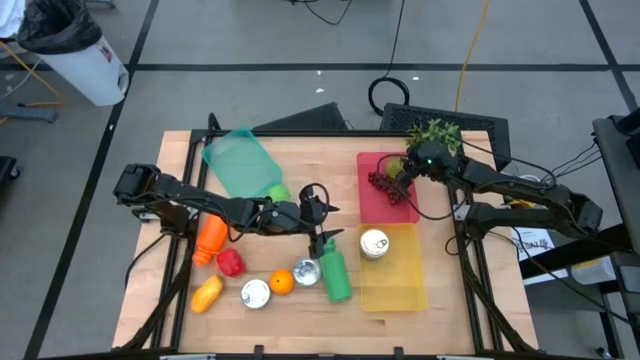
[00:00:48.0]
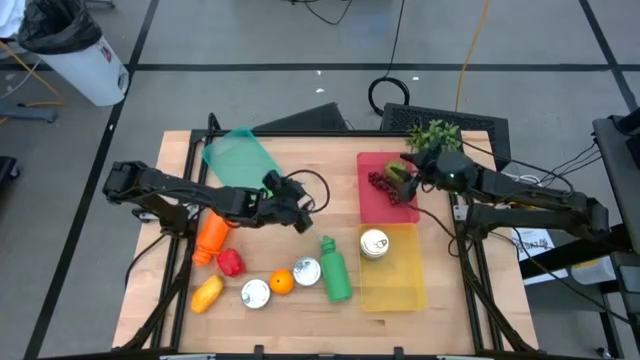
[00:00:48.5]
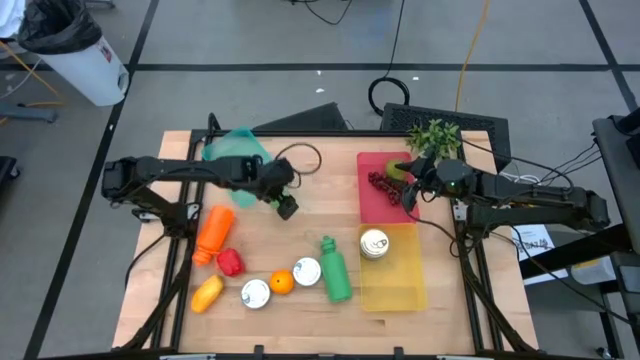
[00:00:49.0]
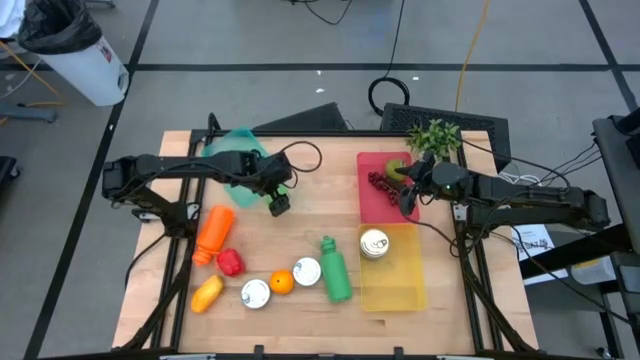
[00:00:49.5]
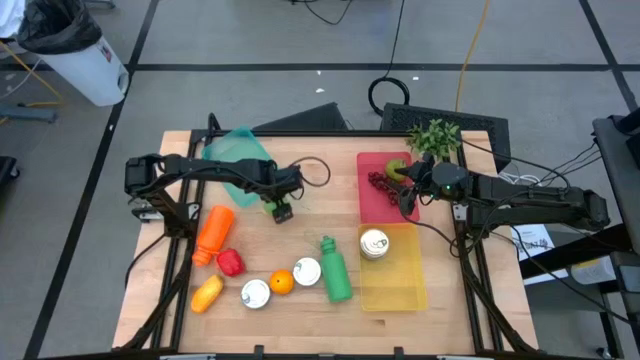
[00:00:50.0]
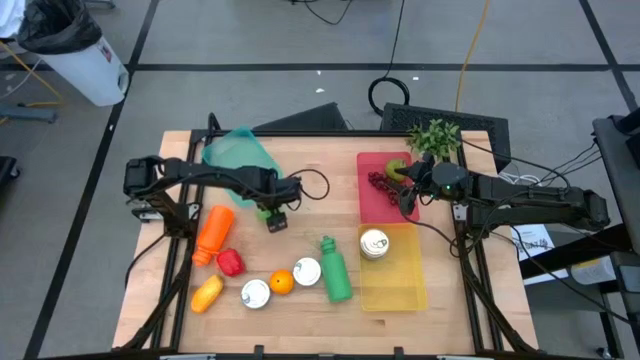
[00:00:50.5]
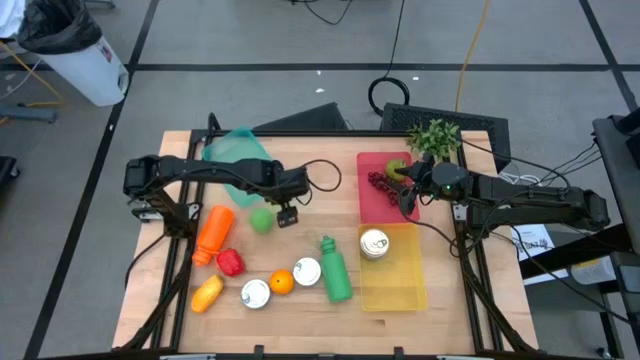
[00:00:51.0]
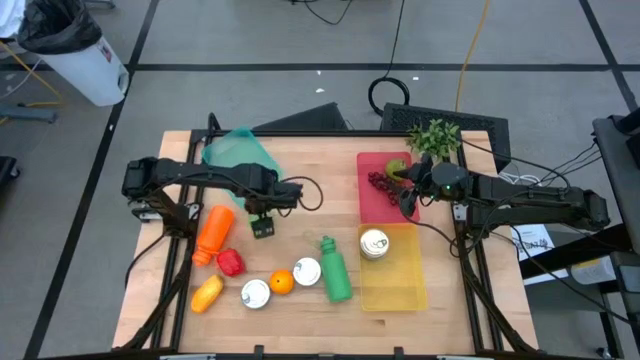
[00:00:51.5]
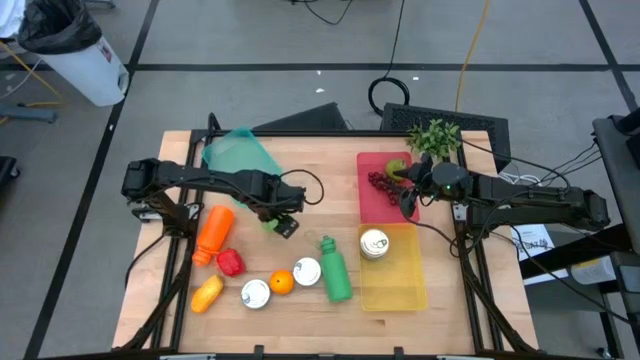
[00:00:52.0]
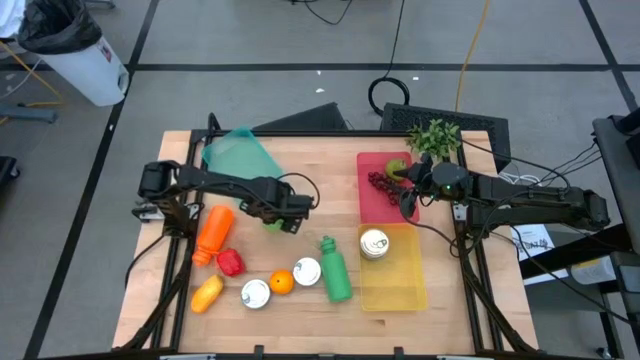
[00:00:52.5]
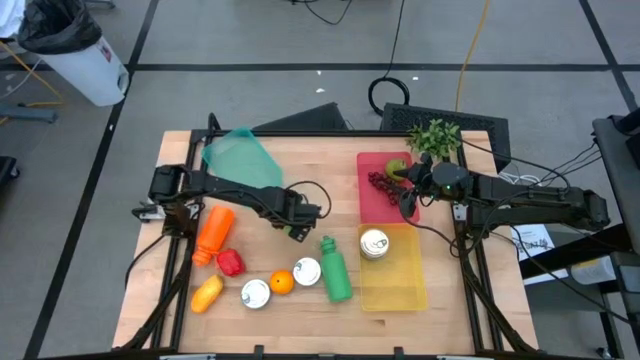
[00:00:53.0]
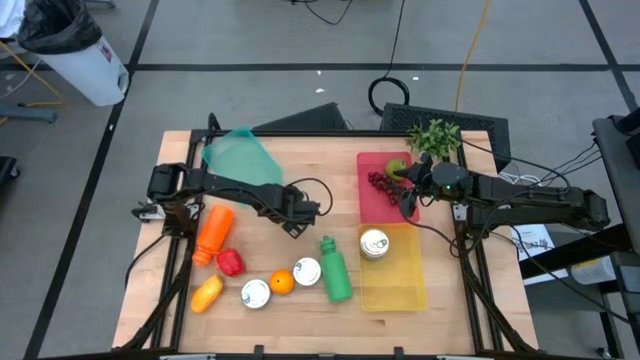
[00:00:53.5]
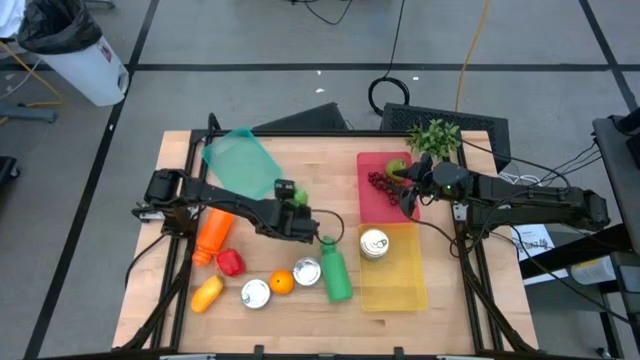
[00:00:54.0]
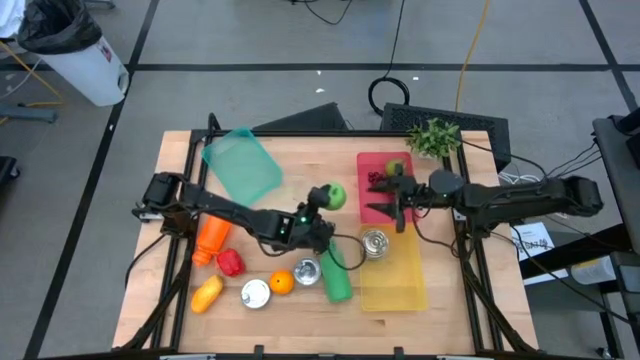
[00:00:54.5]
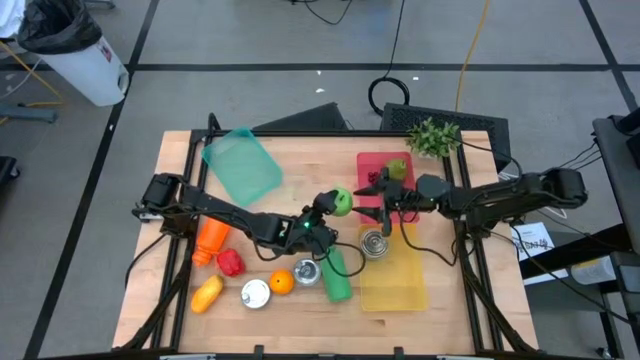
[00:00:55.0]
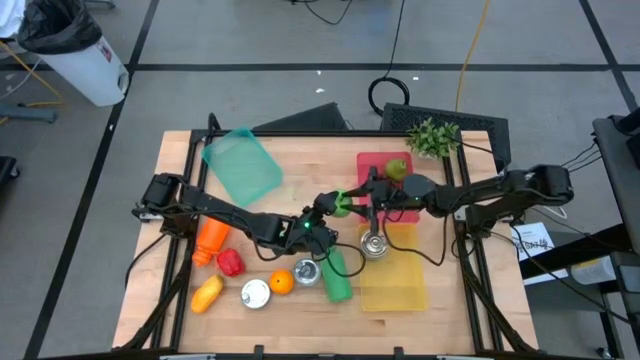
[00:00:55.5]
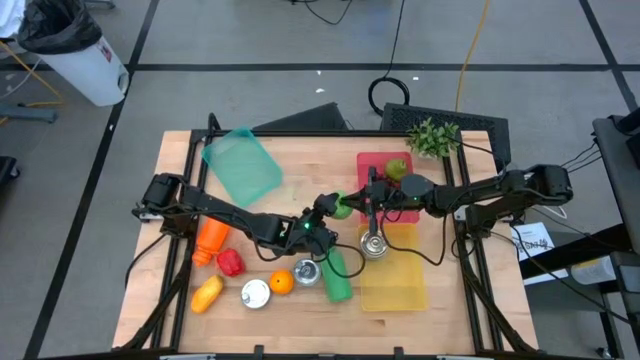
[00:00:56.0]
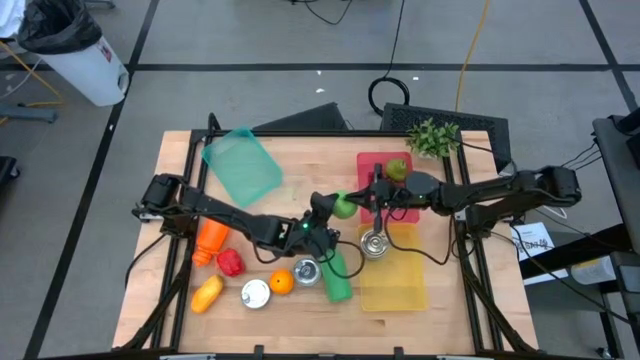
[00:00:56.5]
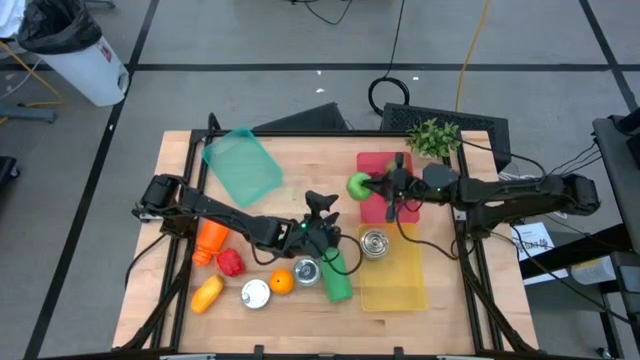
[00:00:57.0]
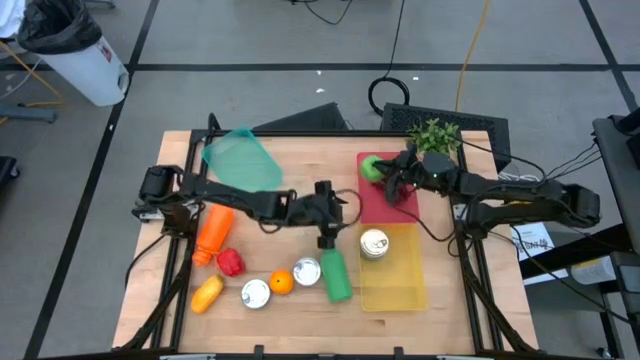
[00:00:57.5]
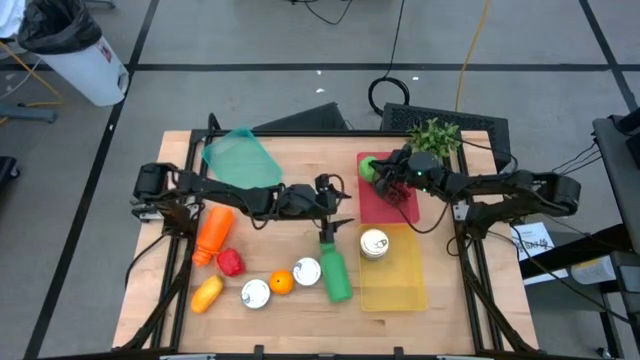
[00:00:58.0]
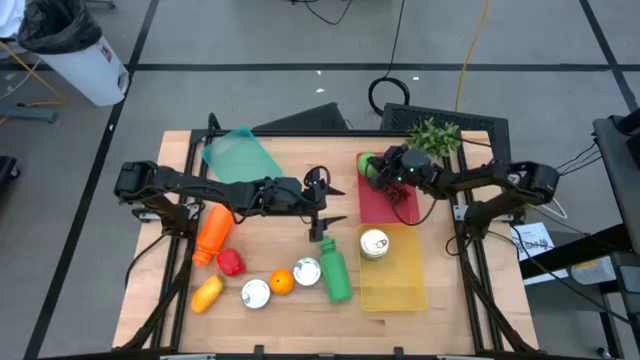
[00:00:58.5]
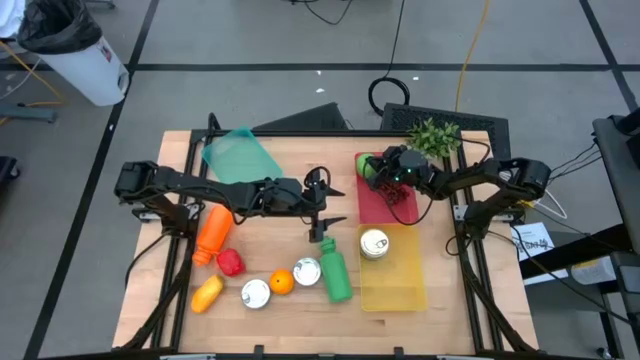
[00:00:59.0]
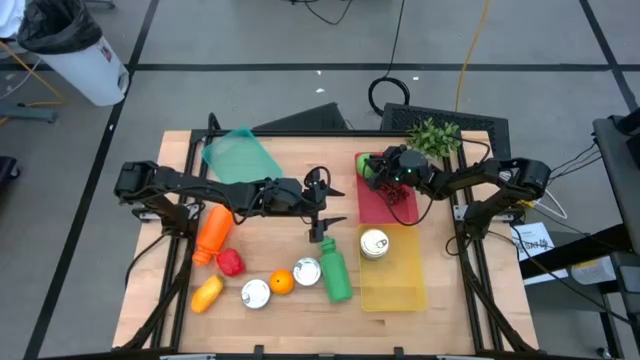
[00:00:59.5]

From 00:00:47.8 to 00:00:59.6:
Task: Pick & Place Food Item
Put the green apple into the pink bin

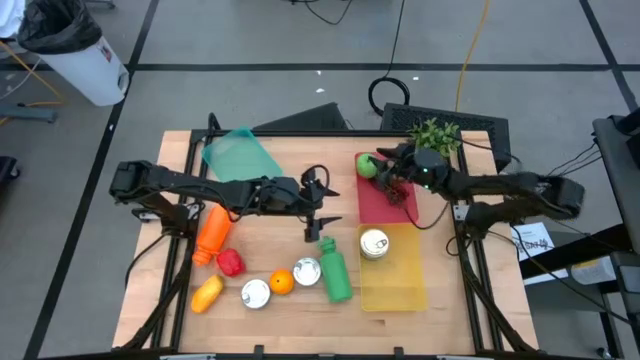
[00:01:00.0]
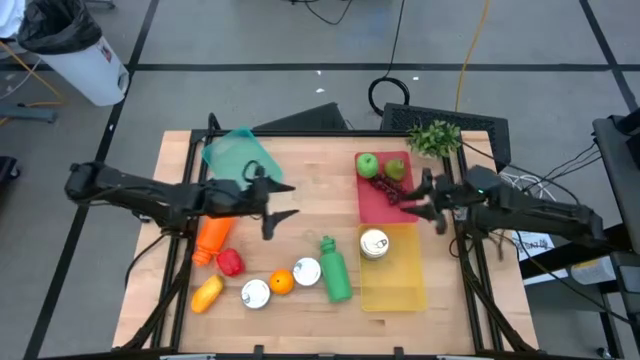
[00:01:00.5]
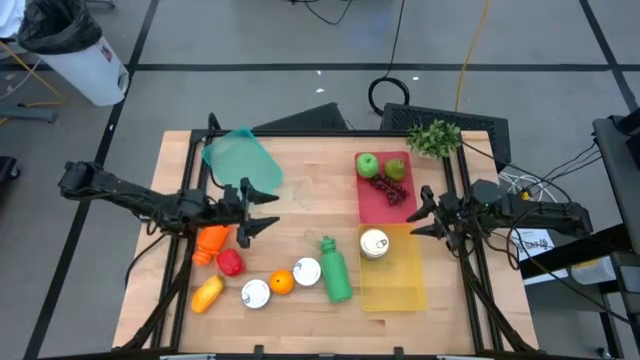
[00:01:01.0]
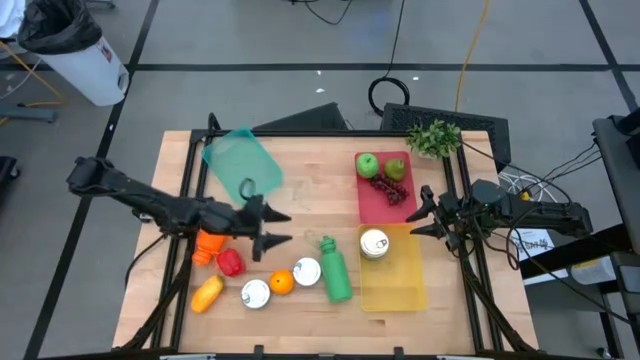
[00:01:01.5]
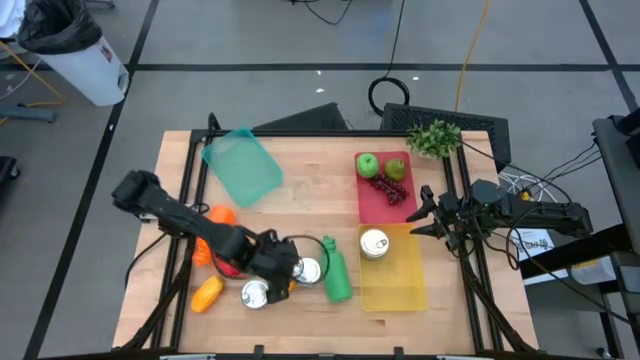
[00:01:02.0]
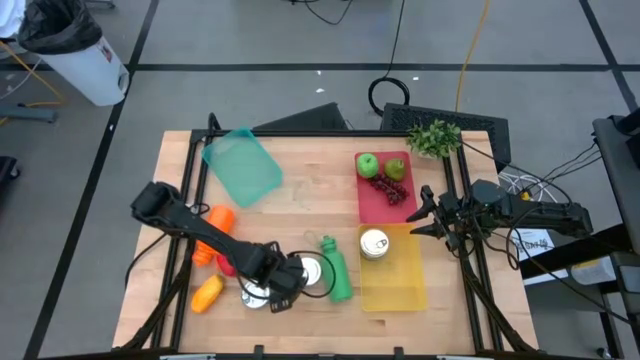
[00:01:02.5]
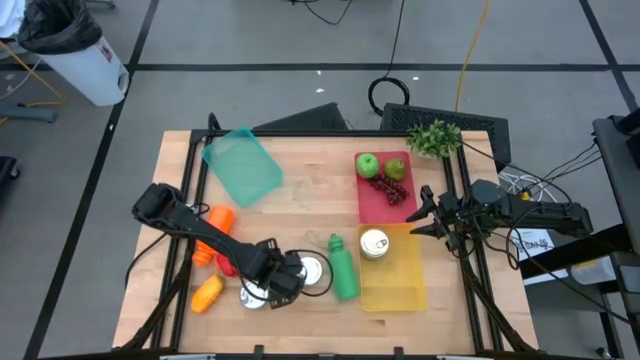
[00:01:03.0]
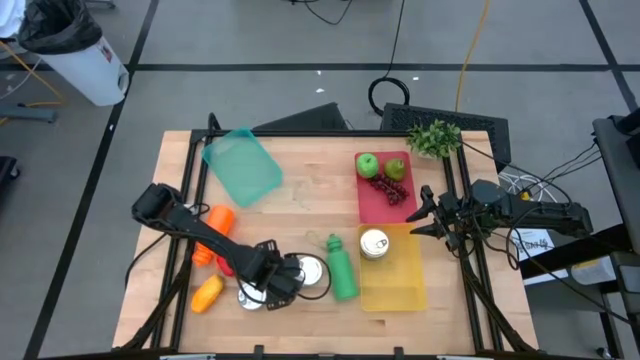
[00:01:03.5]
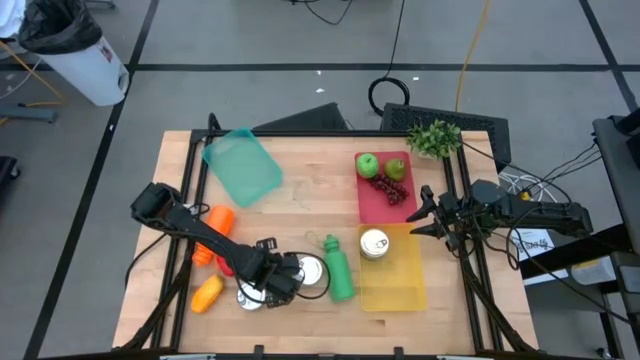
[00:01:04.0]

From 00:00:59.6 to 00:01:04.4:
Put the orange into the pink bin

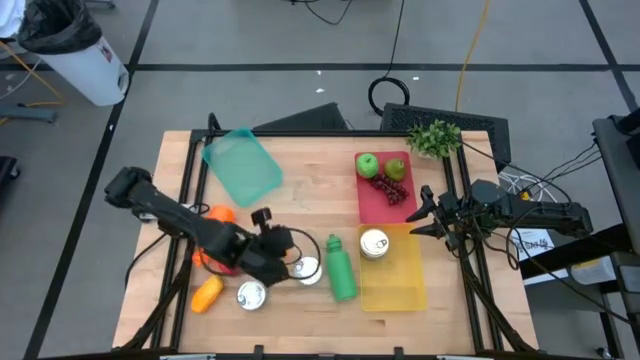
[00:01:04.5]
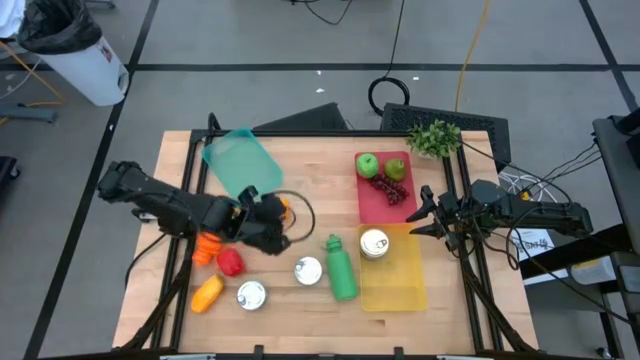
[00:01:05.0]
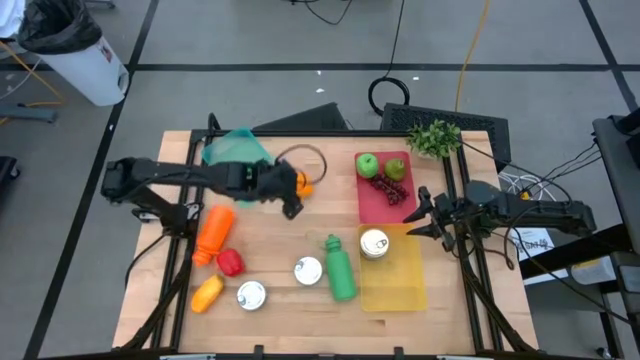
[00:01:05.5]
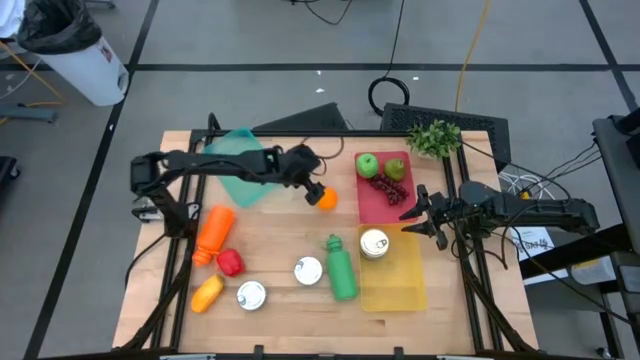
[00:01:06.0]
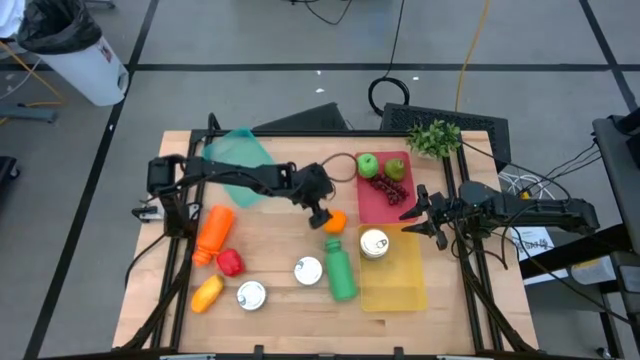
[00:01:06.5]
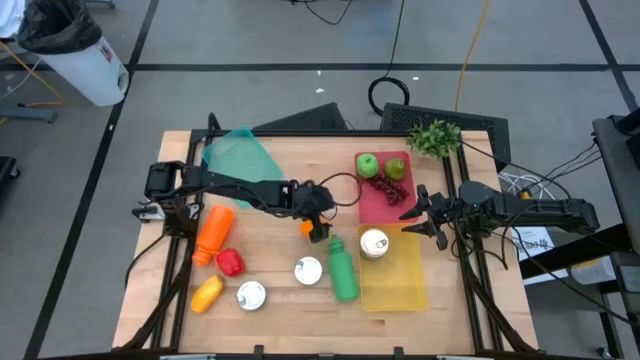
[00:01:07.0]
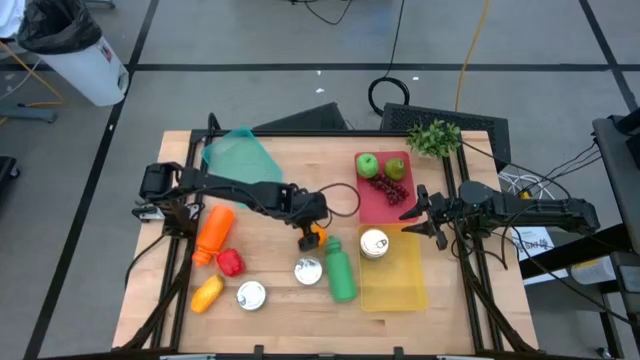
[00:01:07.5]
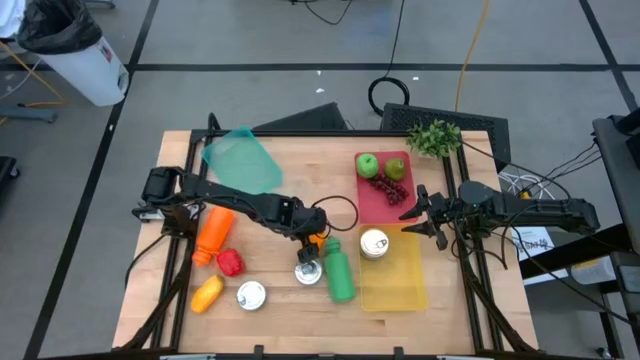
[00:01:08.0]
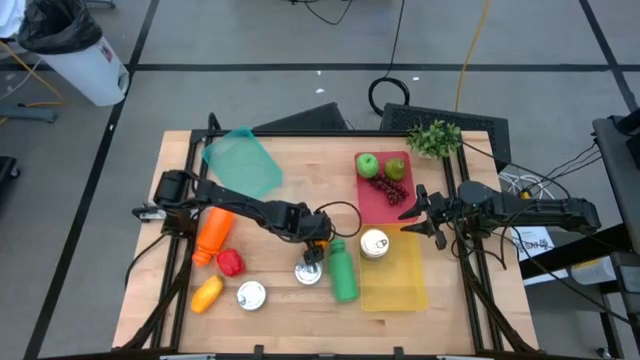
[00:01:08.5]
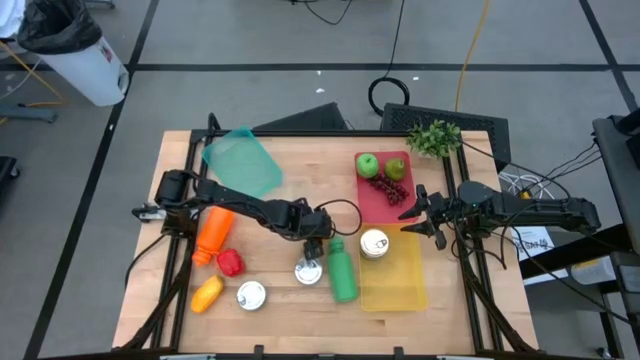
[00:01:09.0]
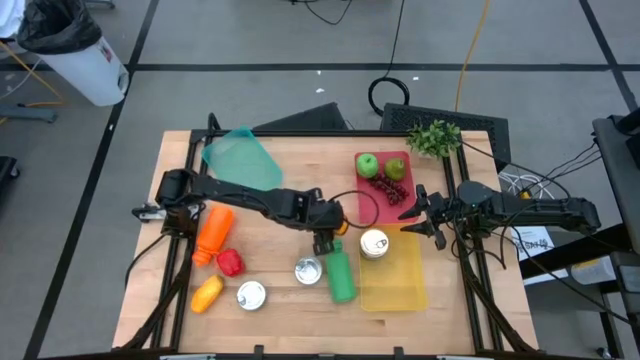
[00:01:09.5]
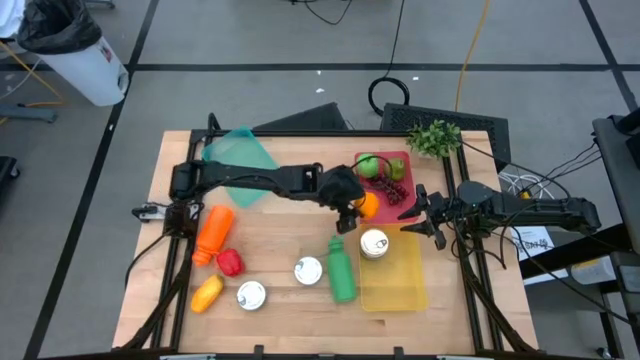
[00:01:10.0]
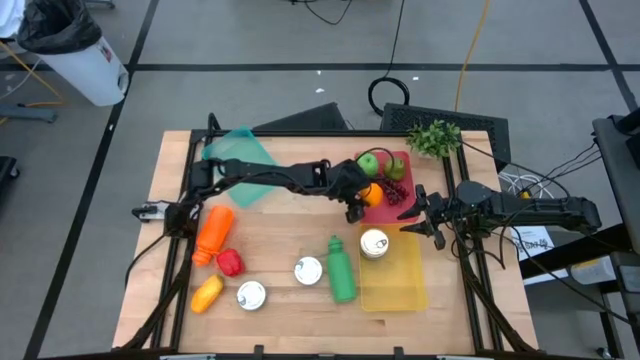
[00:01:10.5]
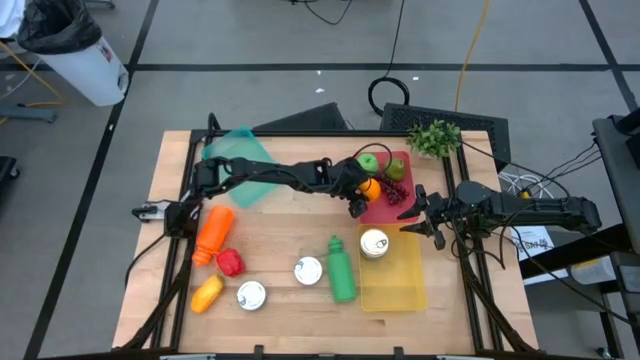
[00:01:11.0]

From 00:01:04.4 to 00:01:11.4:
Put the orange into the pink bin
